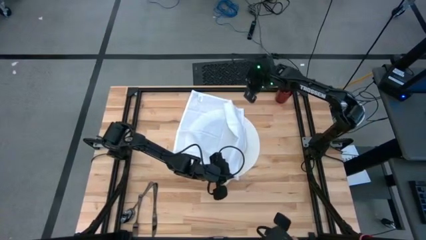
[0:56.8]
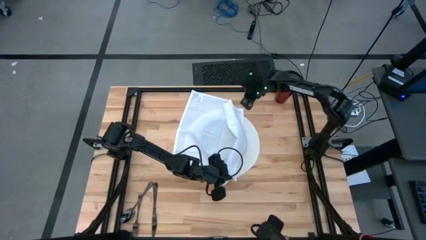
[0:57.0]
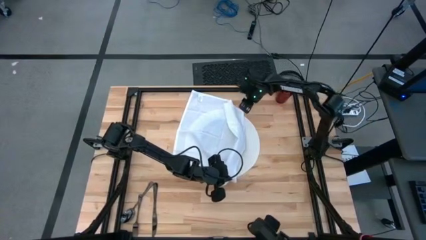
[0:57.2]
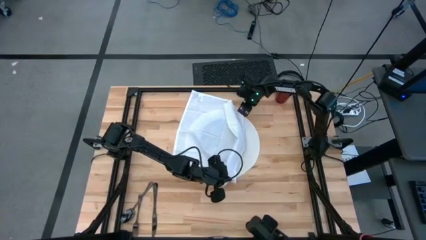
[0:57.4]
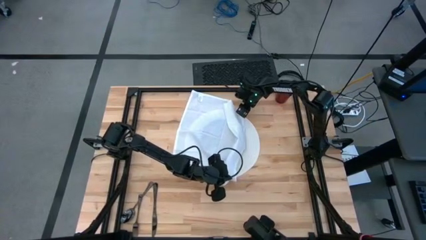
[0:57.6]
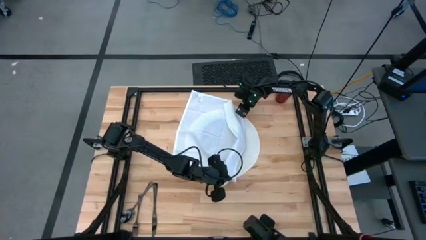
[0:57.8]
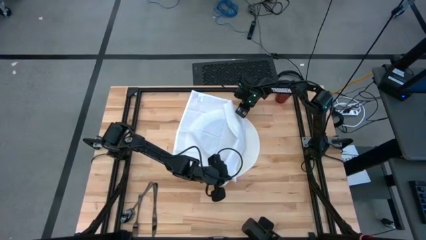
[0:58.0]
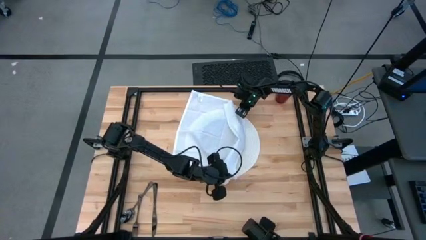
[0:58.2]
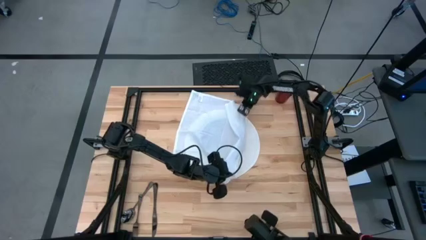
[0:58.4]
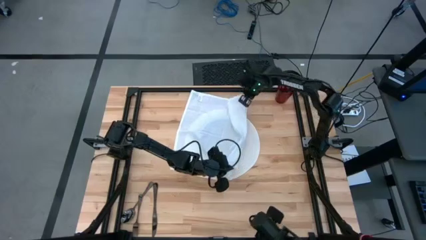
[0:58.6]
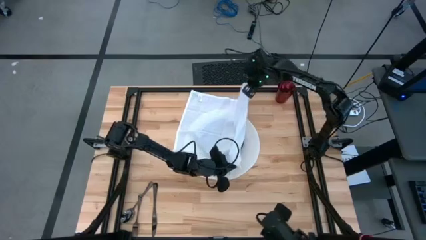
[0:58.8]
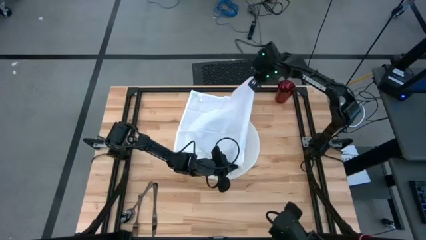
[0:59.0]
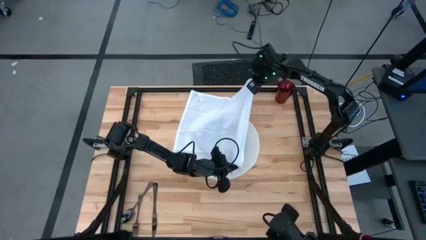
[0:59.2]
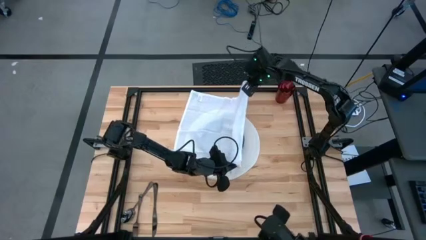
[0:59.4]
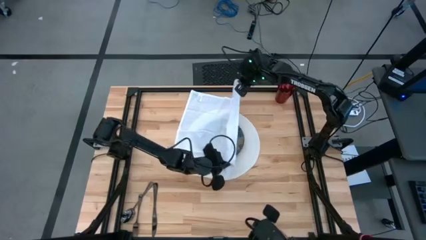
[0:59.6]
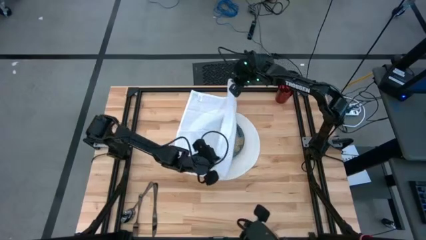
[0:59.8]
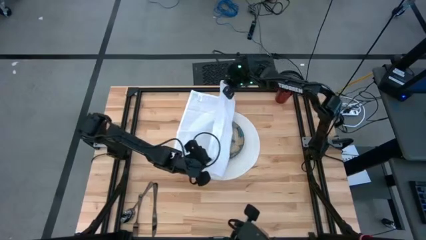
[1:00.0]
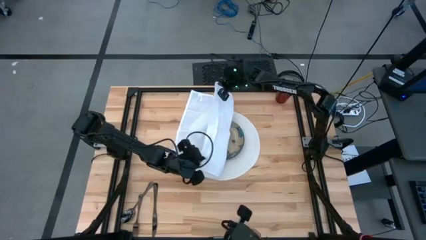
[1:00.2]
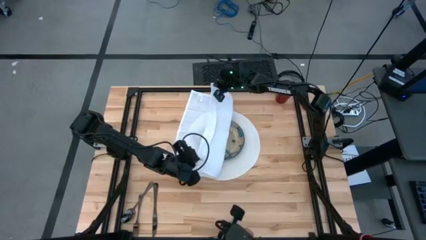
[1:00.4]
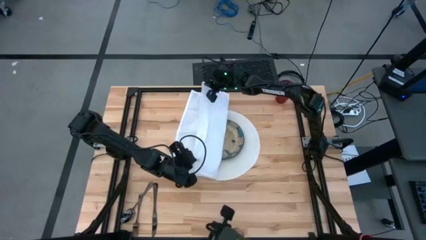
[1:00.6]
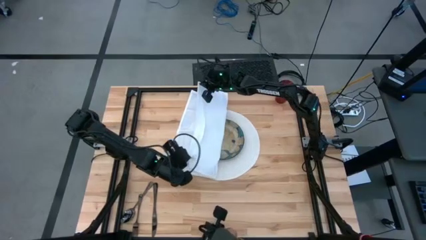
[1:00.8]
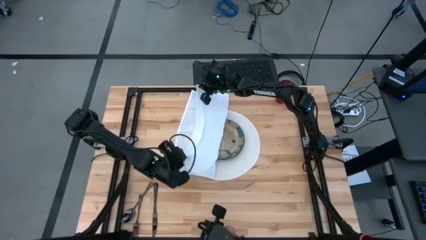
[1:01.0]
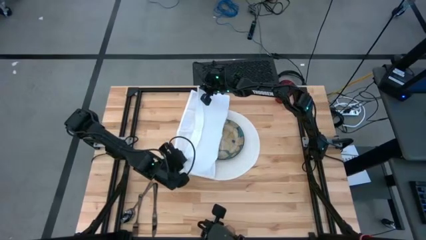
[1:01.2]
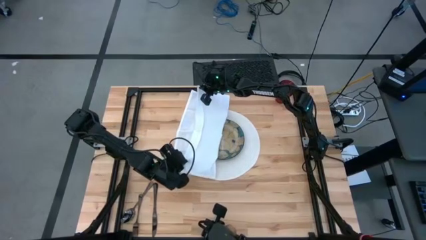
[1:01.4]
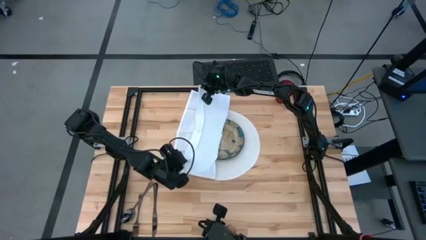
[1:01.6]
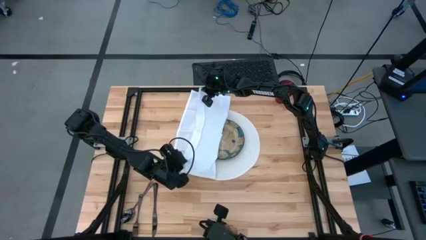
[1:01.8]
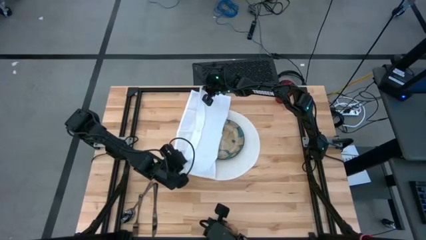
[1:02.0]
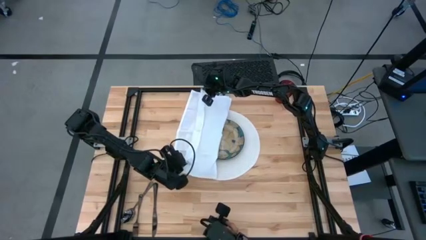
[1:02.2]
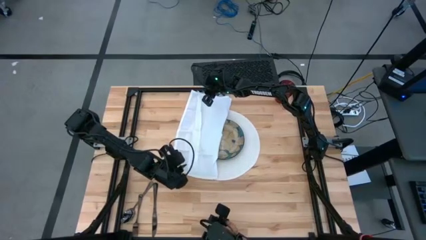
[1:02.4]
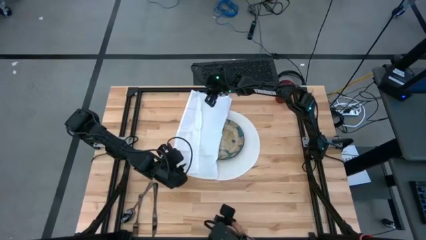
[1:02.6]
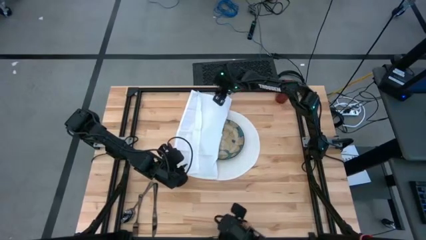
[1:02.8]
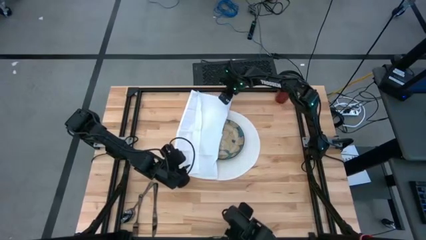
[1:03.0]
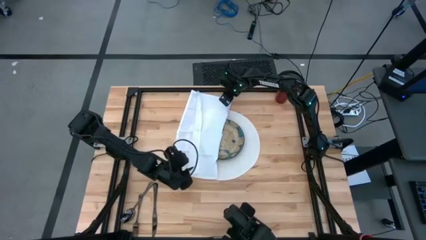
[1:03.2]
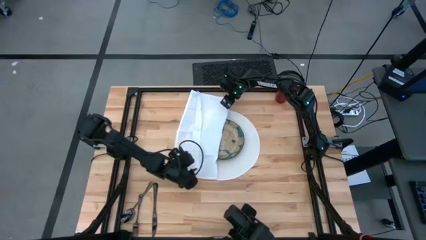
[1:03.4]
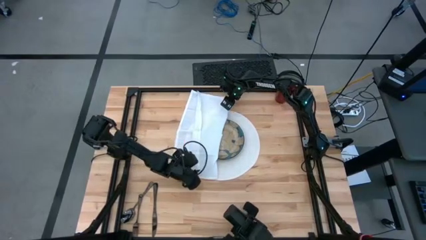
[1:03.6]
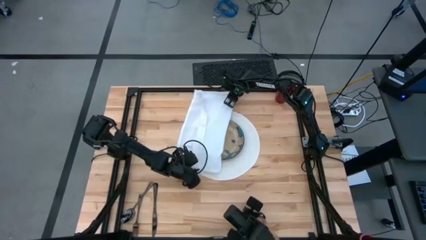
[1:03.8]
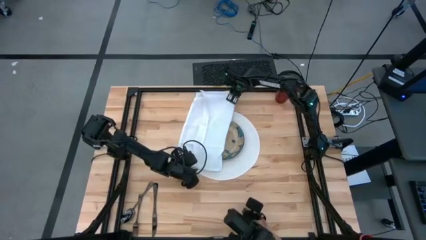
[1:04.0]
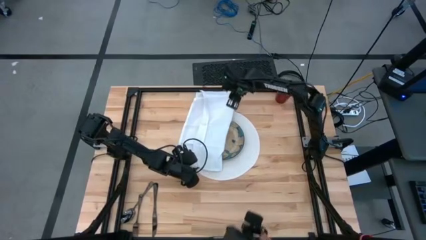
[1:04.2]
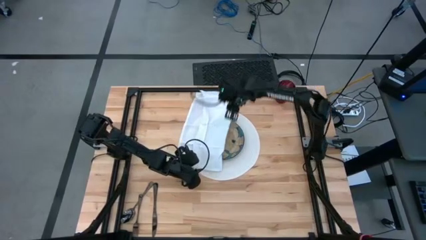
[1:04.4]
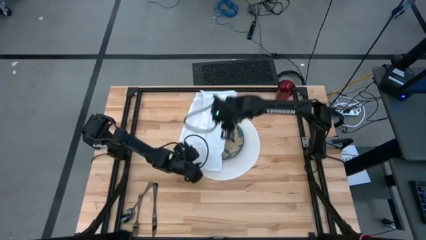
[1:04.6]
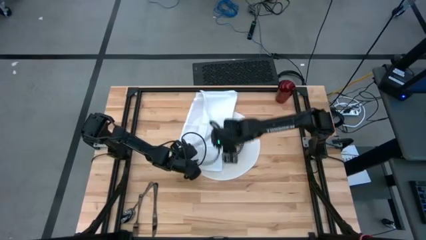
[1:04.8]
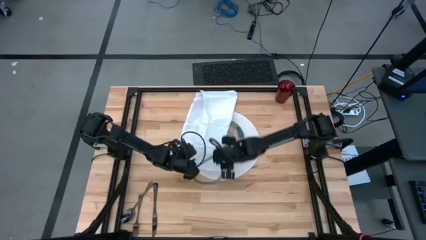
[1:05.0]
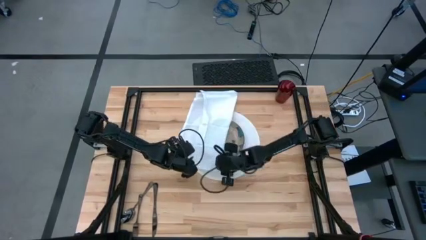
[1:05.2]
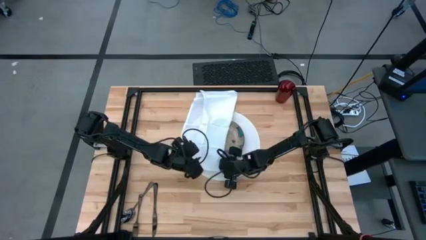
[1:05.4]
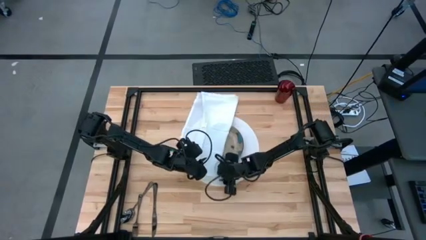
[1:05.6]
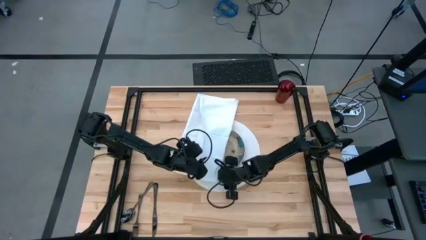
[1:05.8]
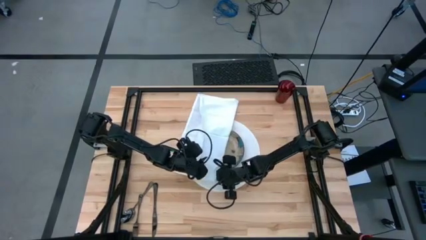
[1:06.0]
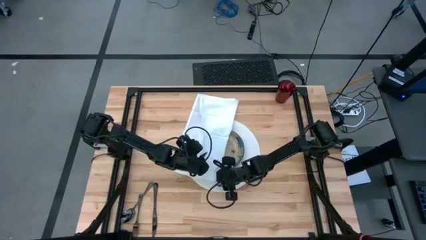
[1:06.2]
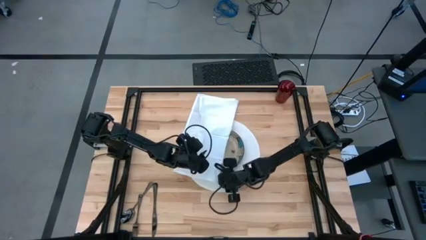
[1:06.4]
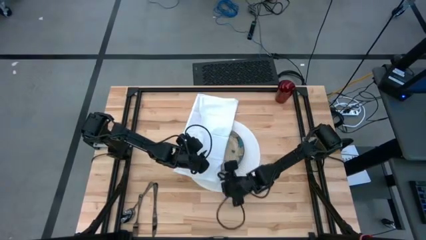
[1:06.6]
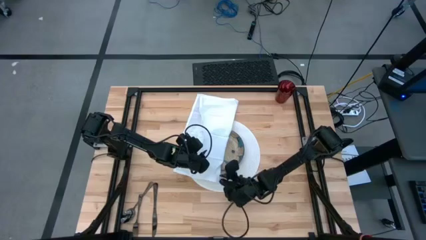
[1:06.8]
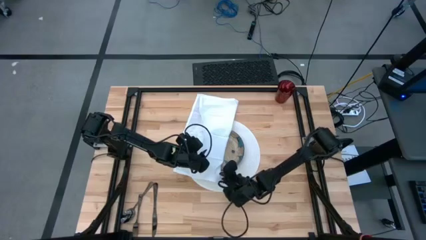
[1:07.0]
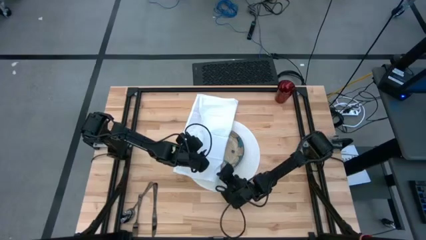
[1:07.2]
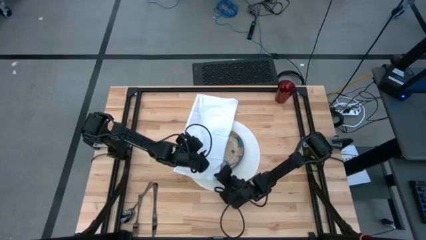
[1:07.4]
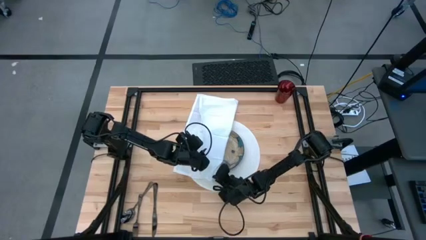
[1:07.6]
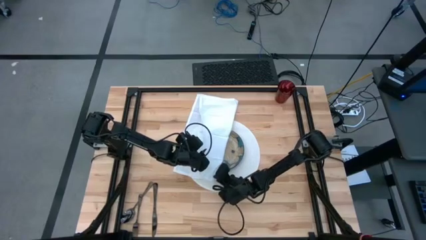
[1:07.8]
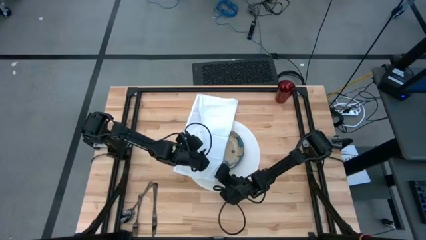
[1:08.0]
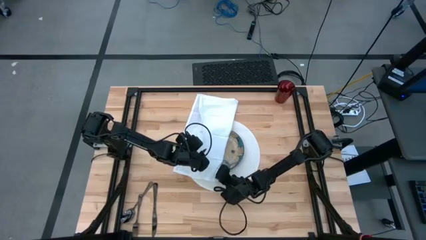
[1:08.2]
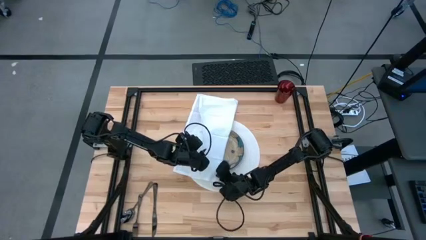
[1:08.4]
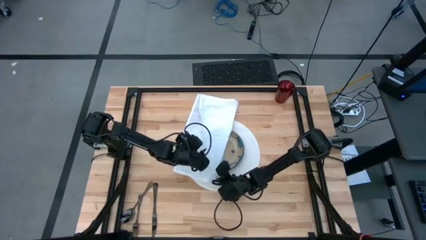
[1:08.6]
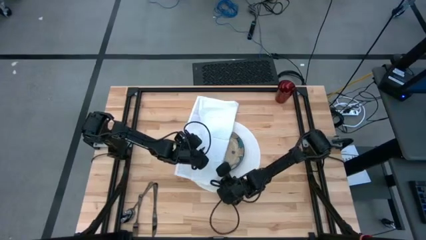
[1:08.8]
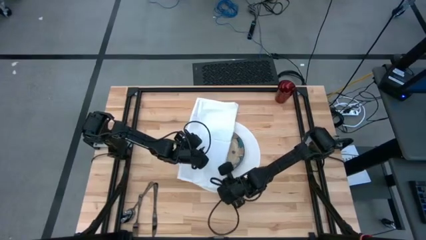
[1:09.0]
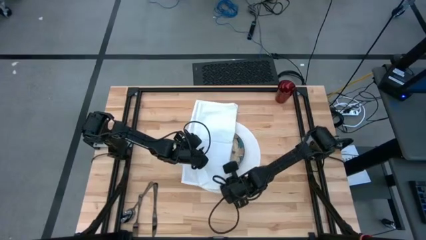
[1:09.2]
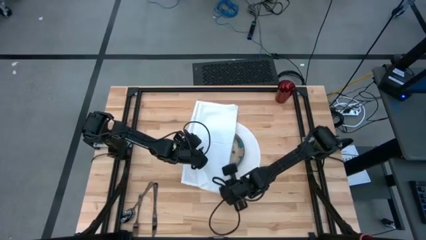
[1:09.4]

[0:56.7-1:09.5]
Task: Set table place
Fold the white napkin

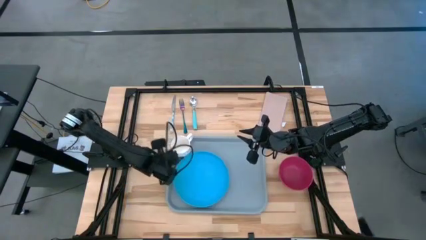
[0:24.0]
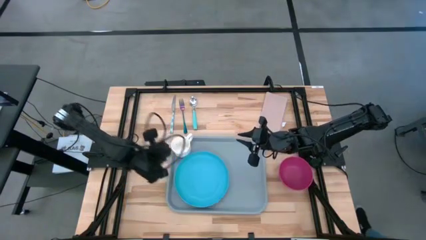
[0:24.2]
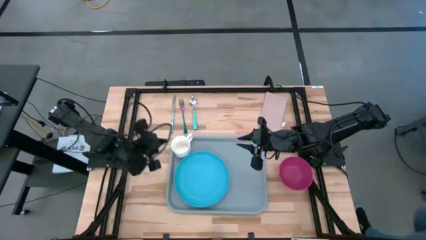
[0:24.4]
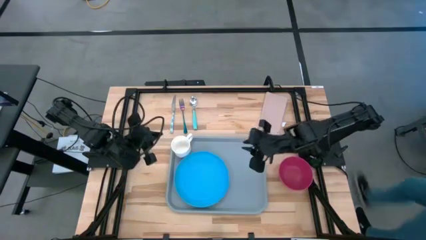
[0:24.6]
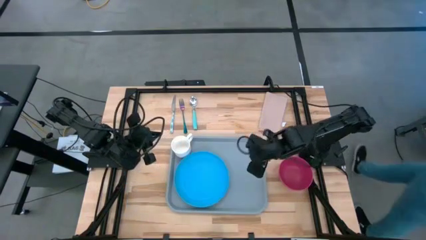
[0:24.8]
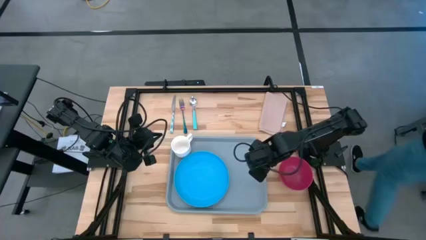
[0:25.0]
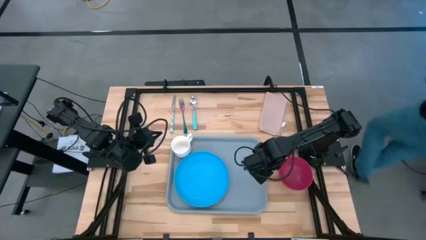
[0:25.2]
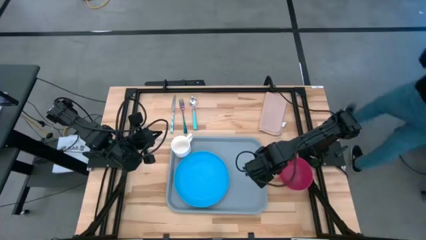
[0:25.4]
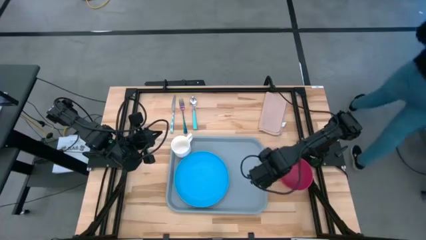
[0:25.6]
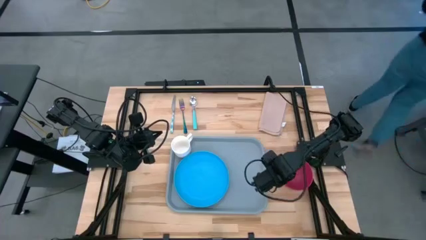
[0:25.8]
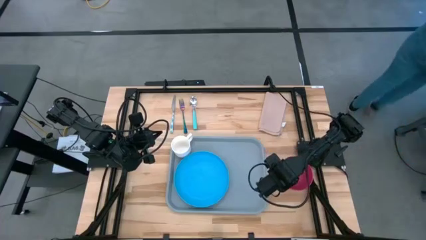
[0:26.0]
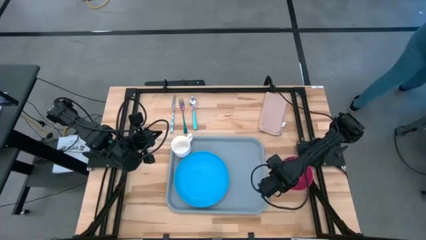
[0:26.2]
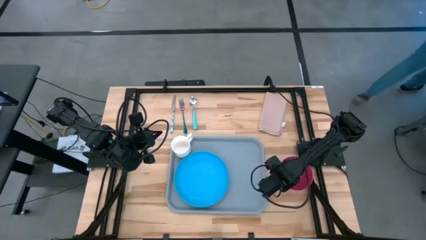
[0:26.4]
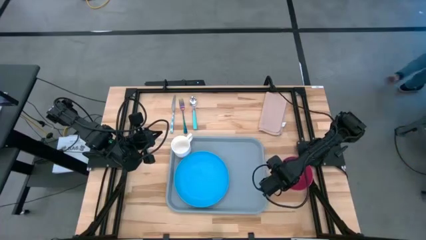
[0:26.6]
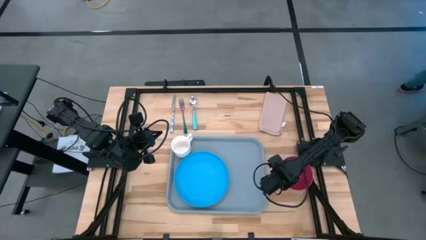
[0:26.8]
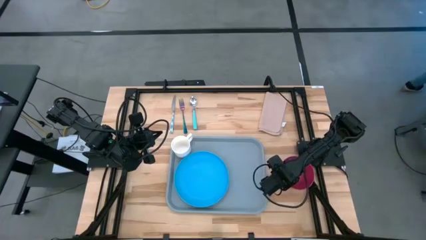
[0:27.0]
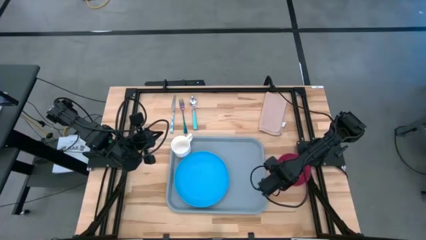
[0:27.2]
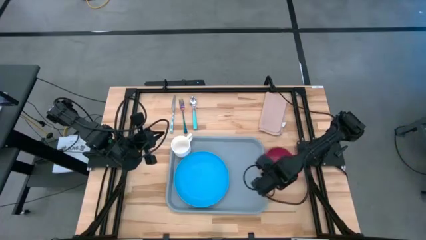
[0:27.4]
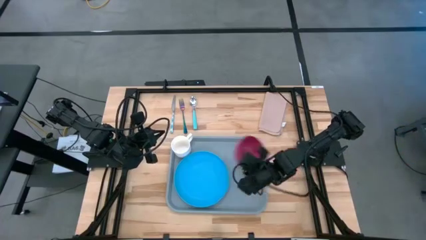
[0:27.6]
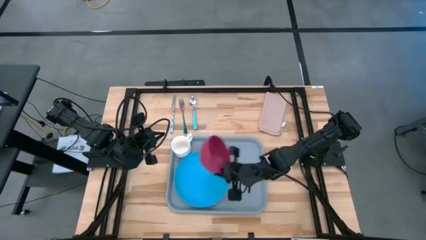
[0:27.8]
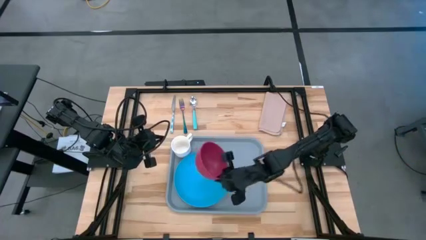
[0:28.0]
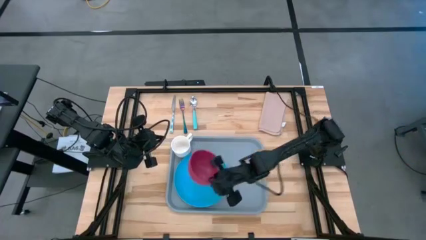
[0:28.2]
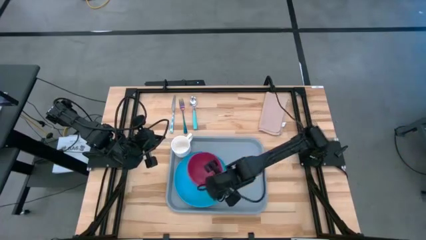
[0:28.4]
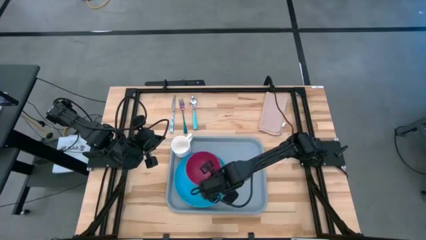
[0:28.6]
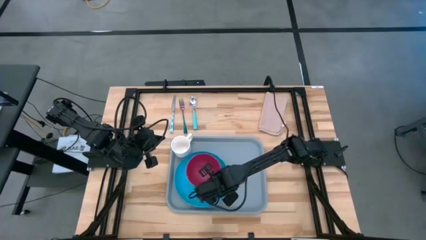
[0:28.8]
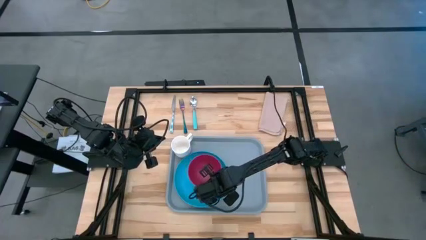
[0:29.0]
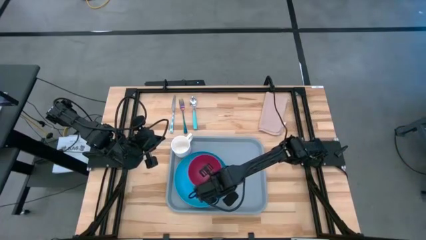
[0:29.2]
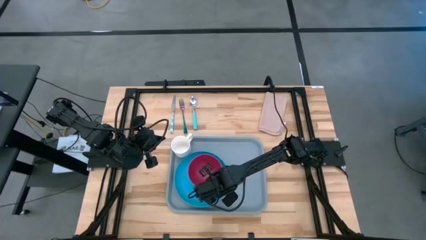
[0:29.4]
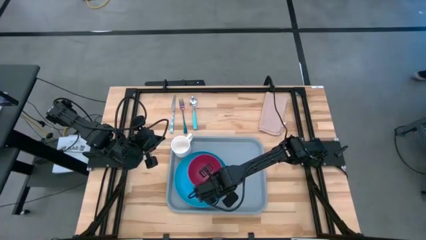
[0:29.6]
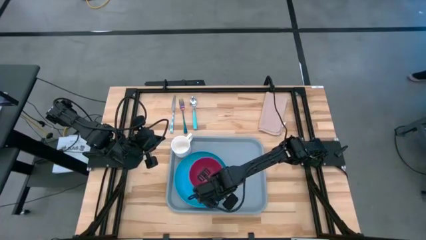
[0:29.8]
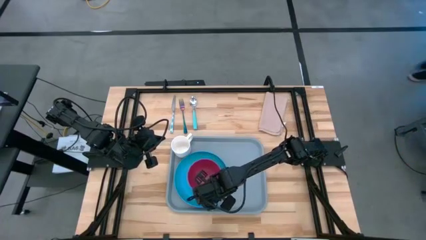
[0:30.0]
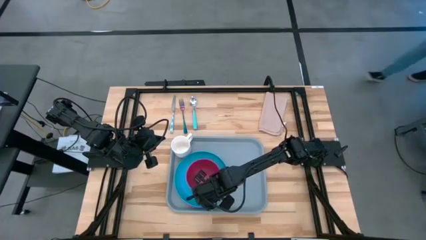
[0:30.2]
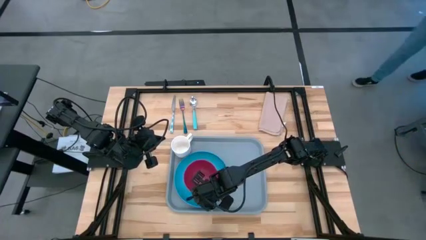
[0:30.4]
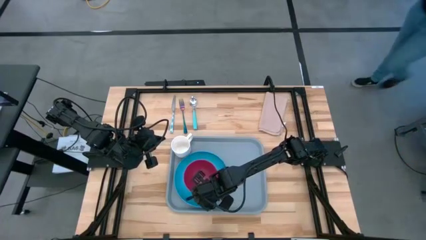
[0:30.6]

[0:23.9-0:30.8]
Task: Set up tray
Put the red bowl on the blue plate
